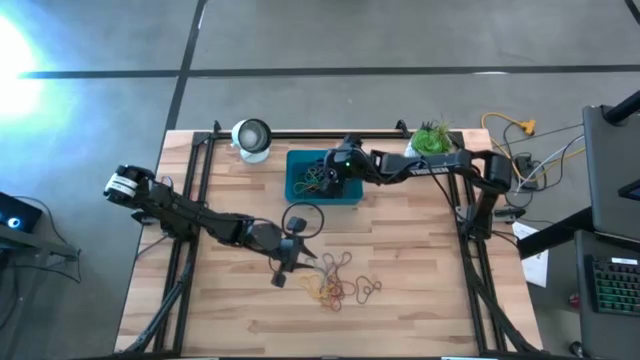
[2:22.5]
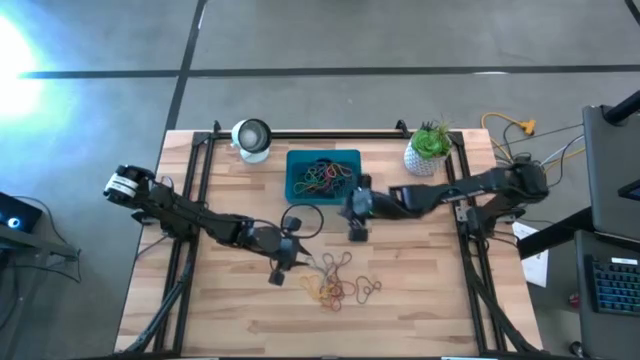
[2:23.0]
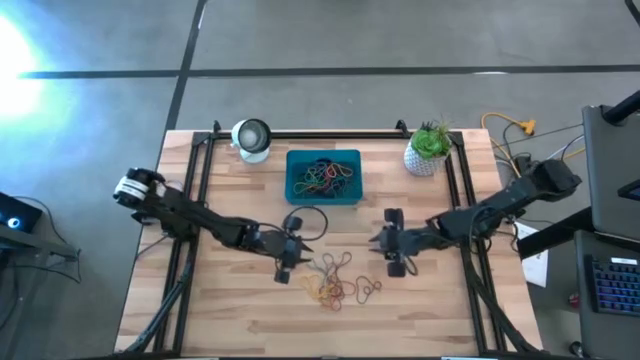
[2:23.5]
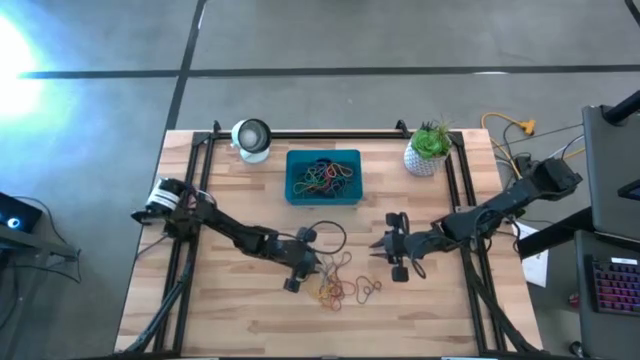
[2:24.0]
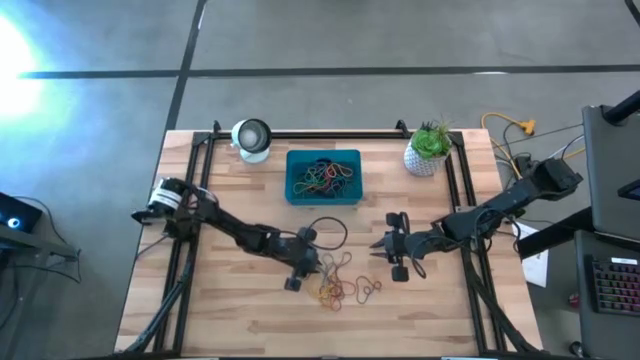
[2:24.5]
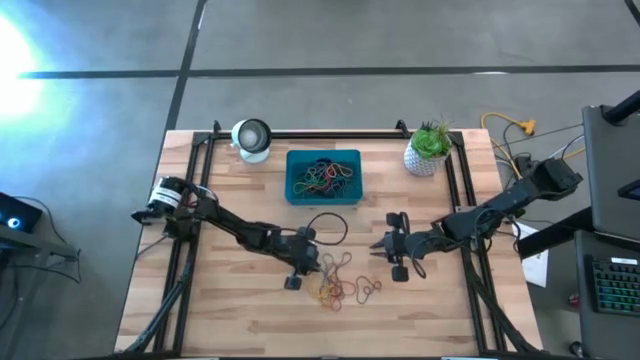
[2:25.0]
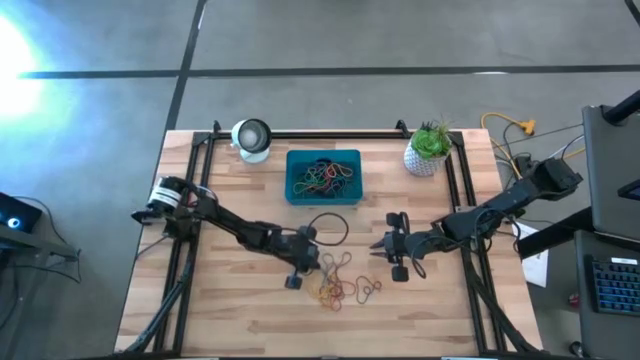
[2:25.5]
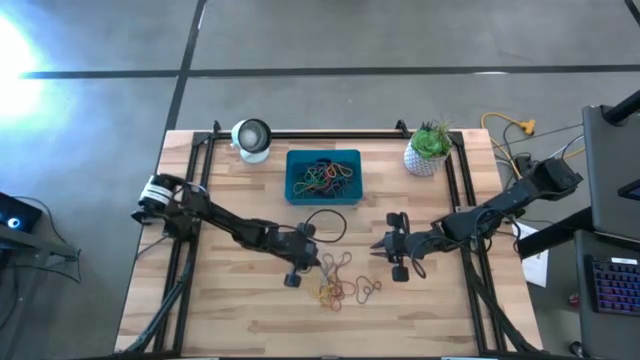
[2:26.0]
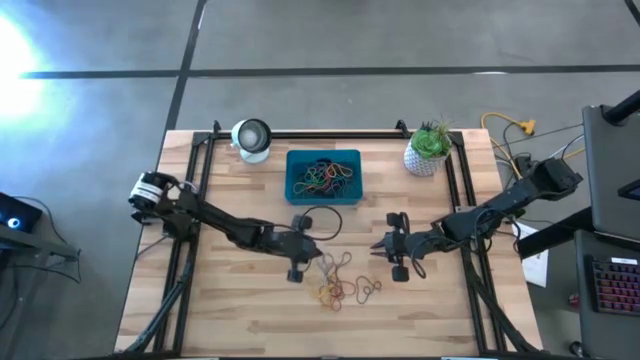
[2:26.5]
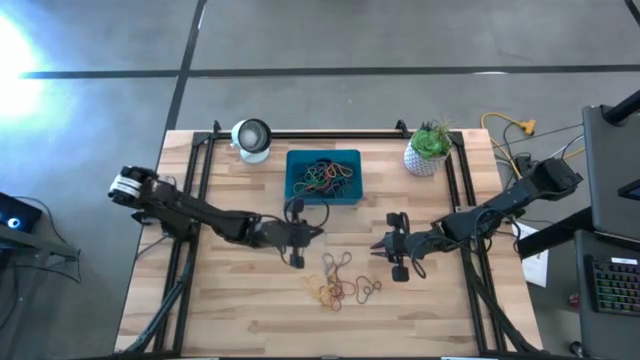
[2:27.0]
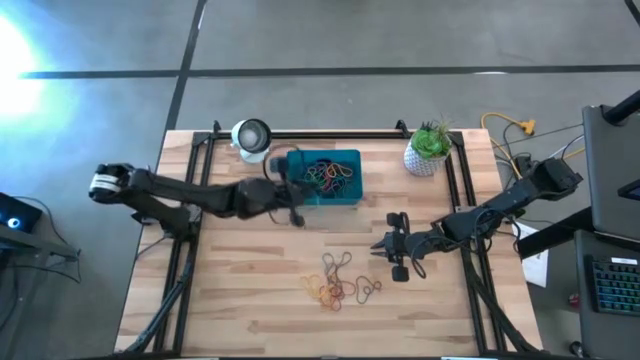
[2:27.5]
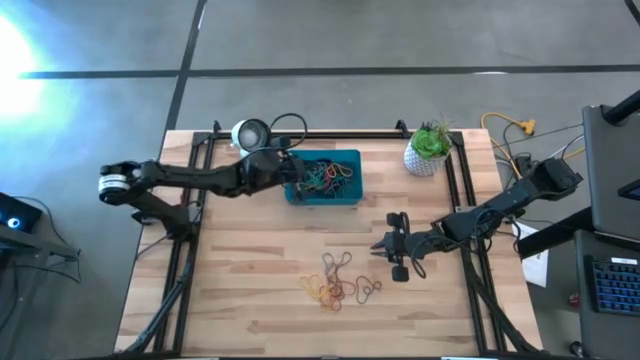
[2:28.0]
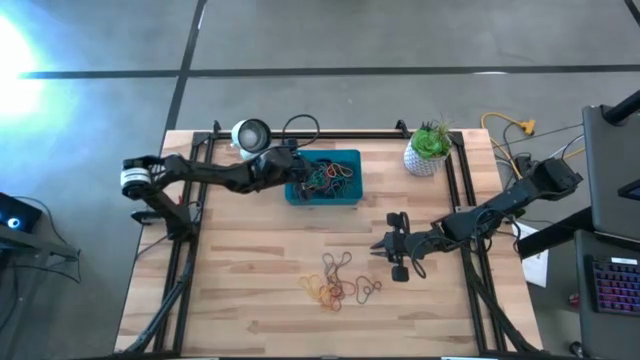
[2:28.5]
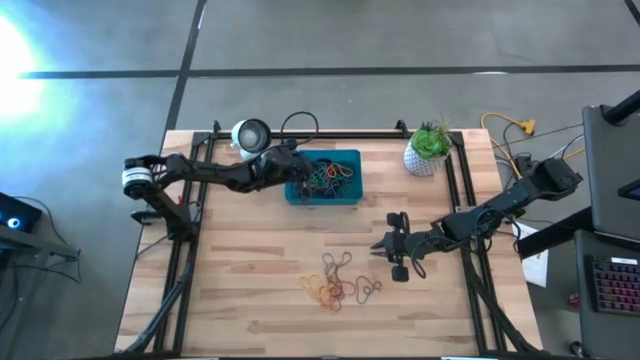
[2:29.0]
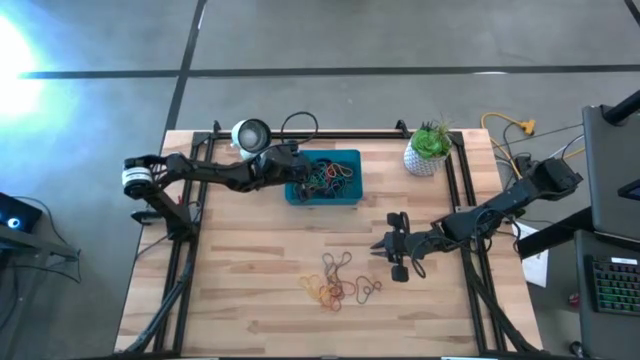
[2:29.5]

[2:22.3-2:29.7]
Task: Pick and place rubber bands into bin
Put the blue rubber band into the bin

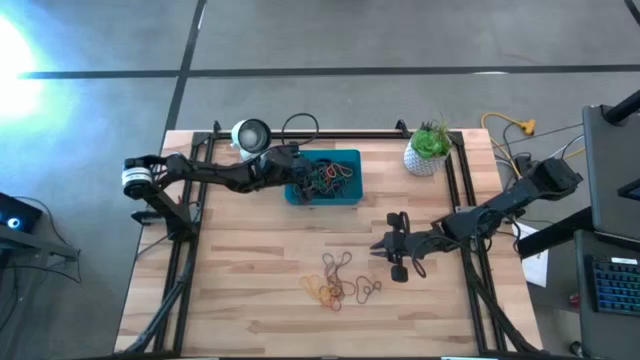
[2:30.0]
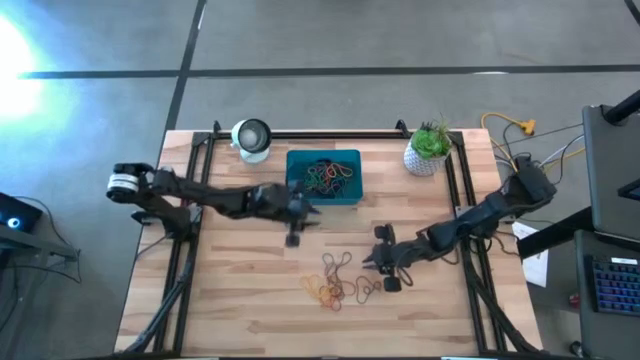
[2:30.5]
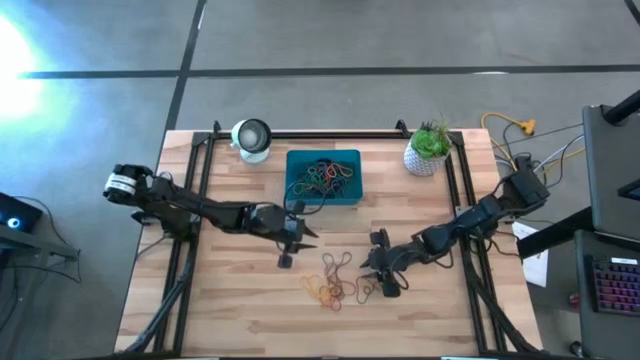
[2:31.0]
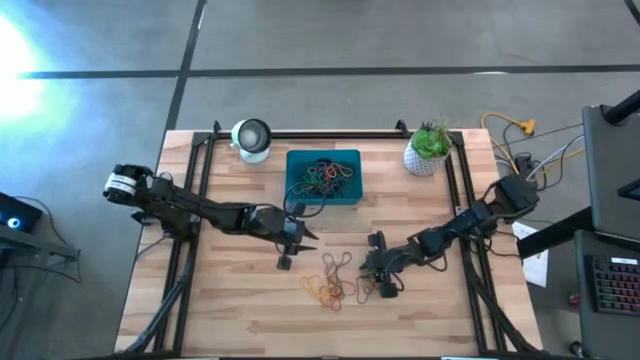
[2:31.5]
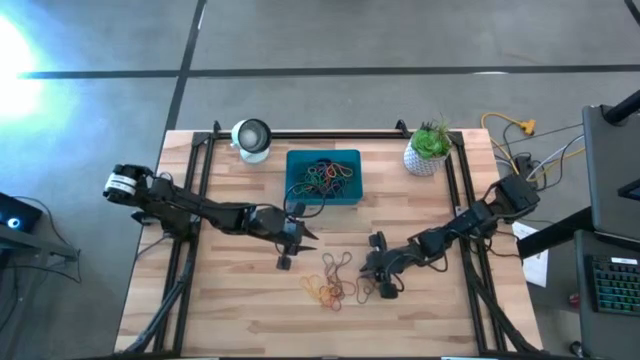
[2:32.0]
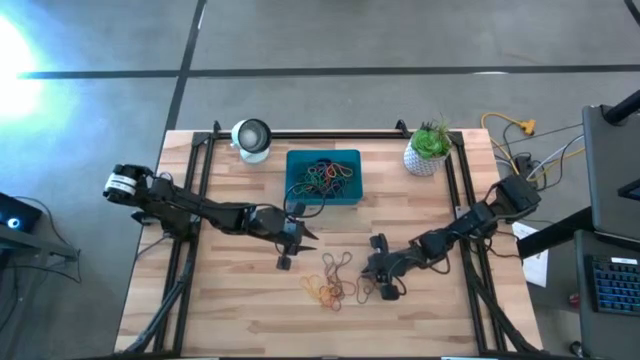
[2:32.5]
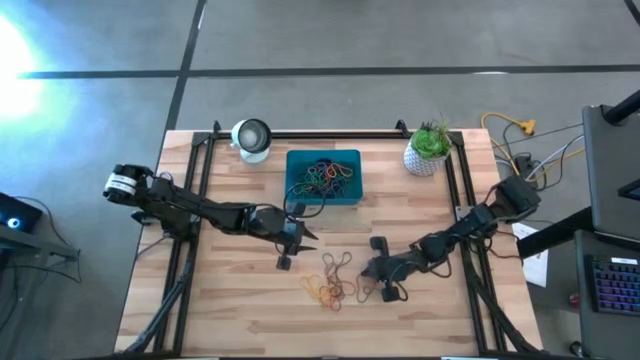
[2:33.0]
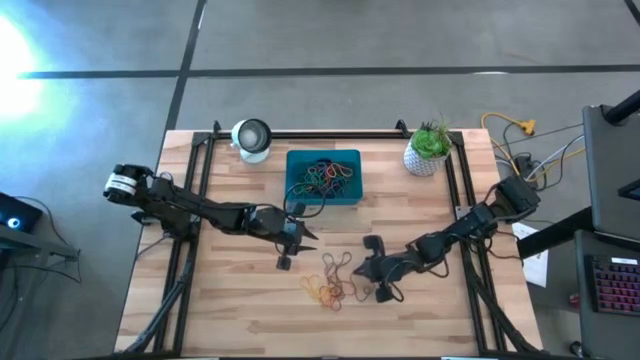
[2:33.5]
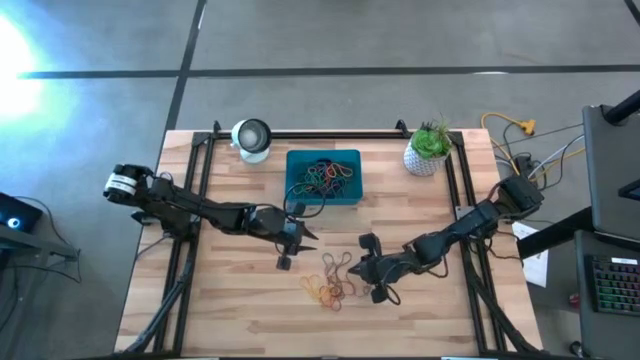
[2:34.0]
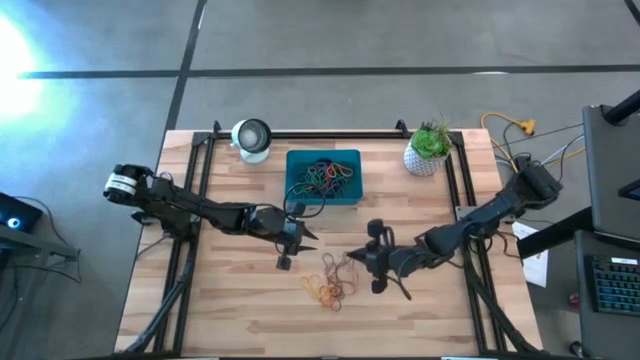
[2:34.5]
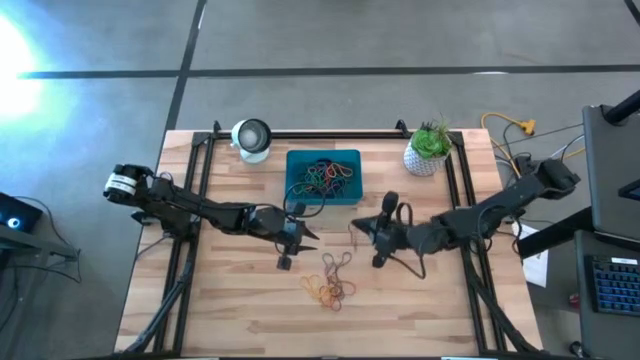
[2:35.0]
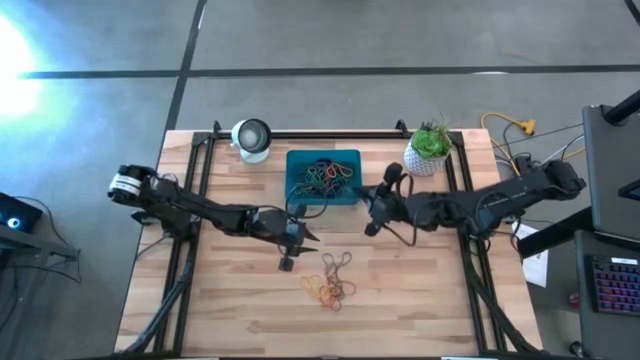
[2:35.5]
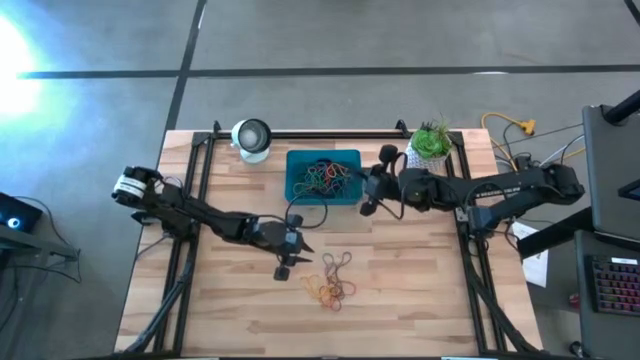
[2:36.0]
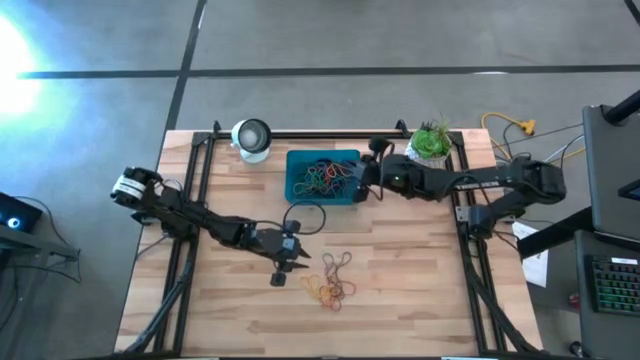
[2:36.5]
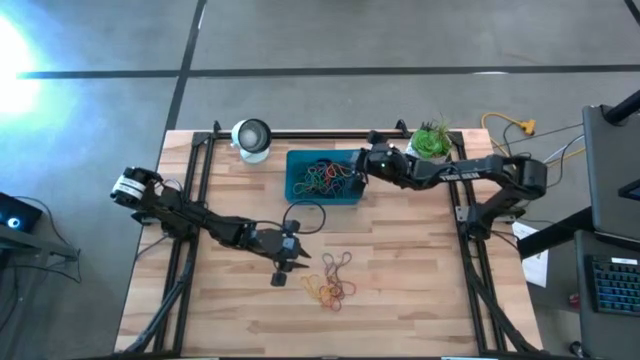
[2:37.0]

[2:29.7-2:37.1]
Put the purple rubber band into the bin

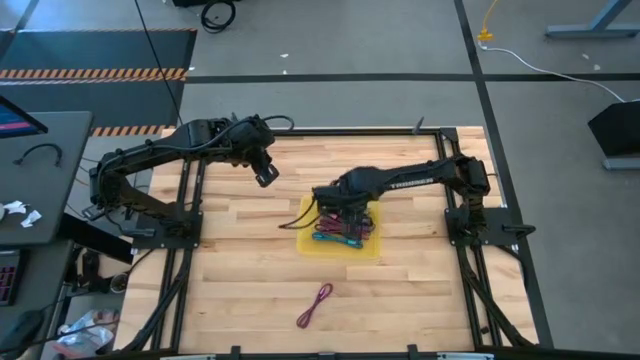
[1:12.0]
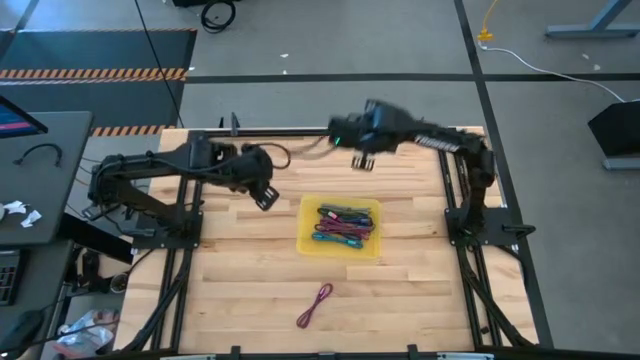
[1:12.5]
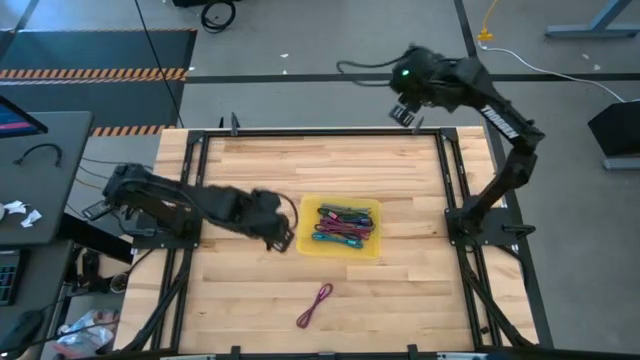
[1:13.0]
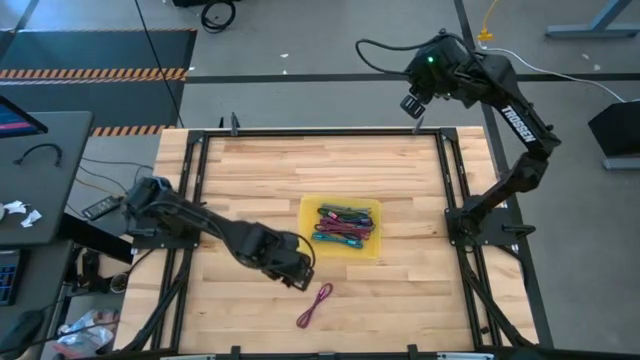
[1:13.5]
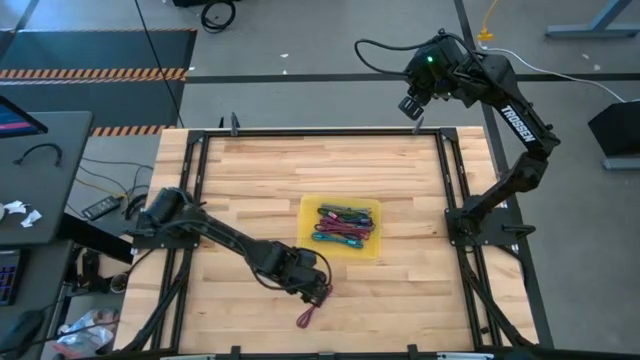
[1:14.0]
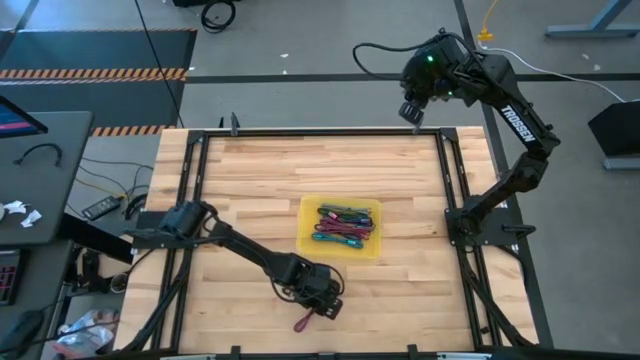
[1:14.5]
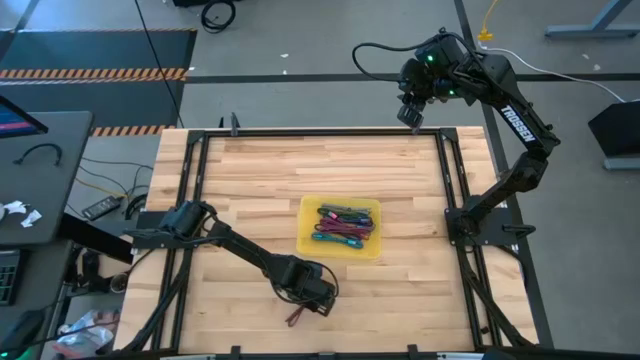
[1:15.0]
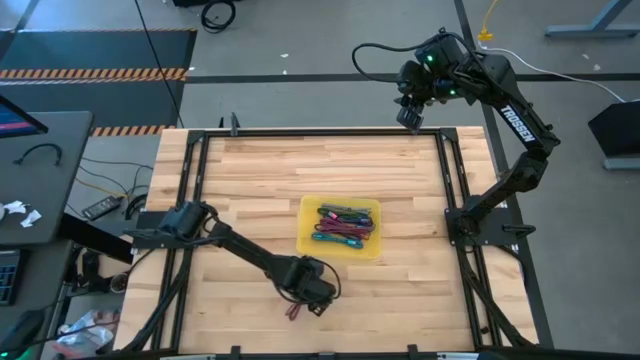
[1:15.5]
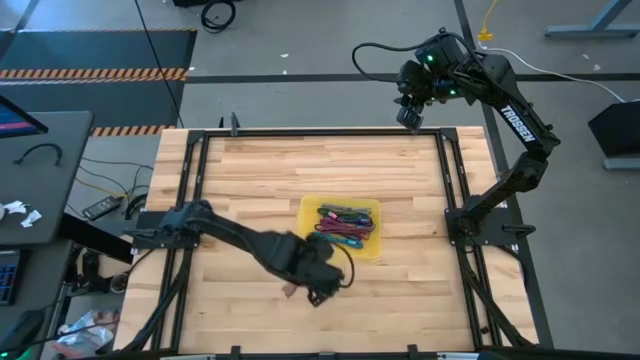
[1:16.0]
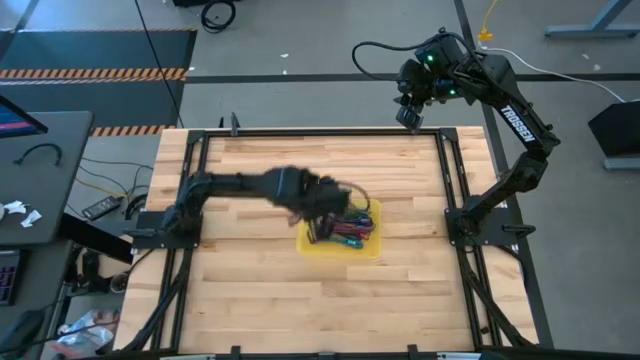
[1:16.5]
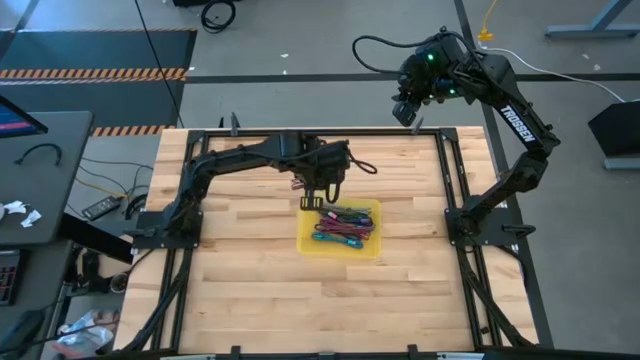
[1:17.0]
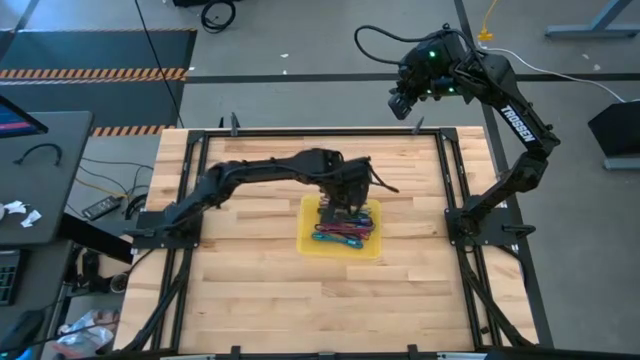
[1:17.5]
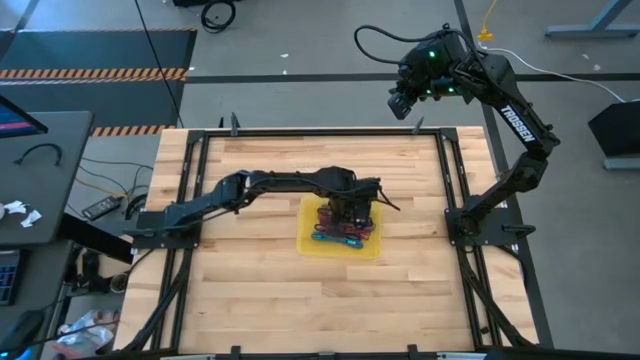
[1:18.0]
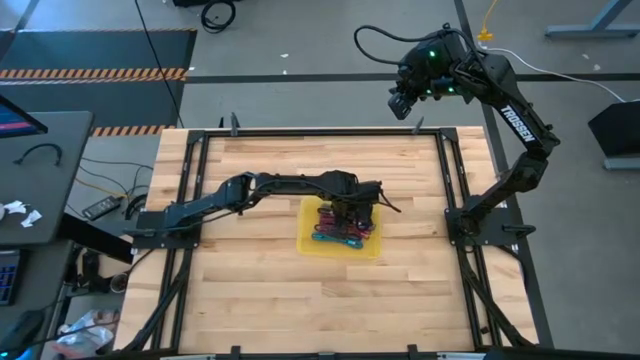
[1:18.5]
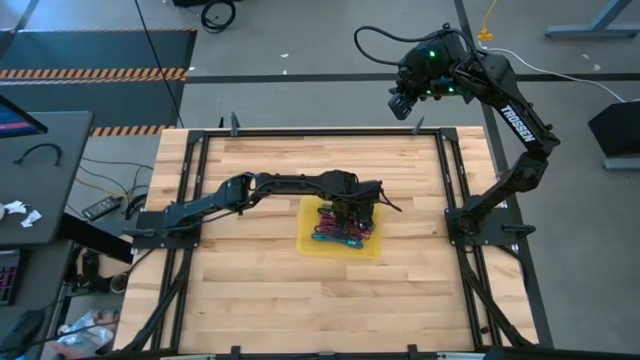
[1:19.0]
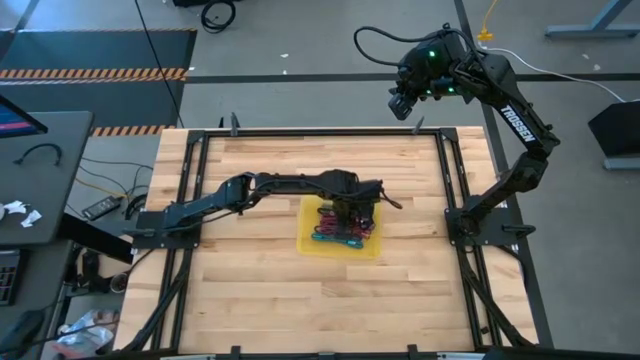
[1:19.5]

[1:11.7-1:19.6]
Task: Pick and place USB-C Cables
Put the pink charger cable into the yellow bin
